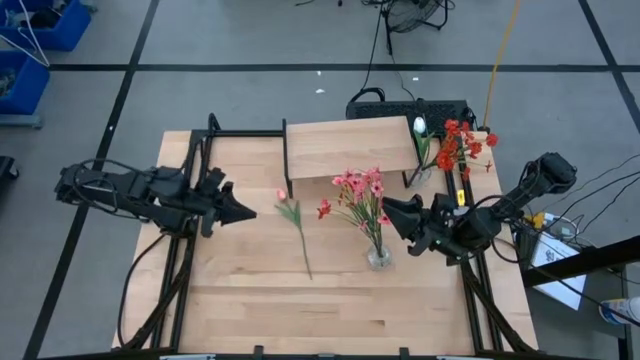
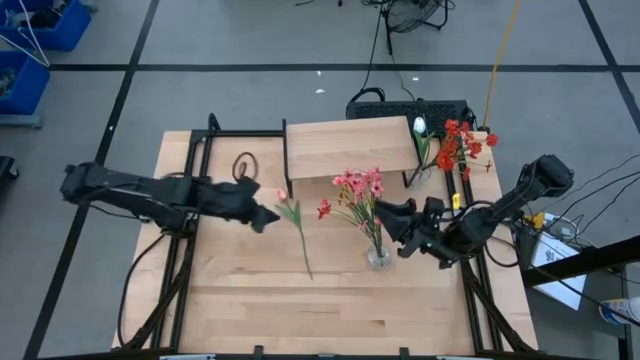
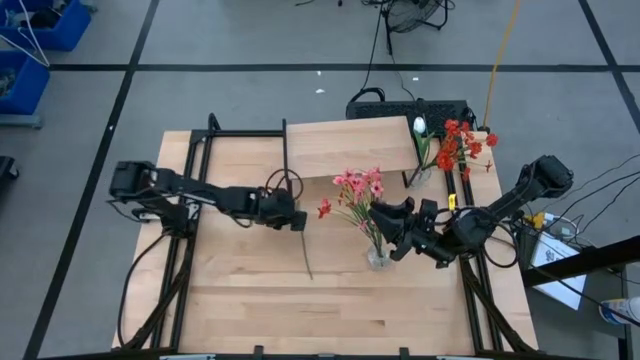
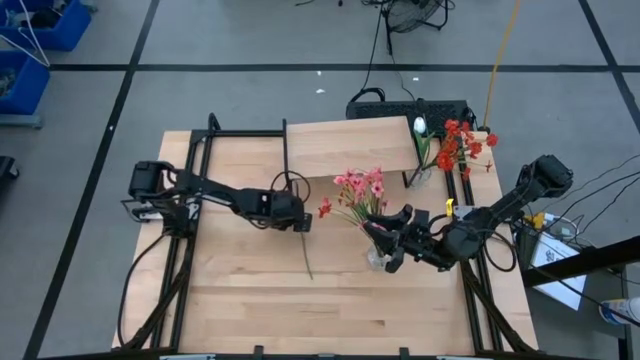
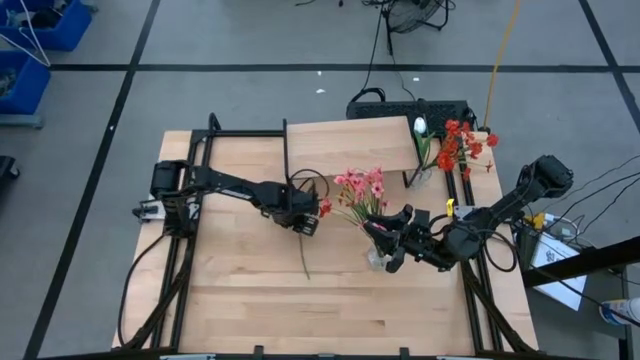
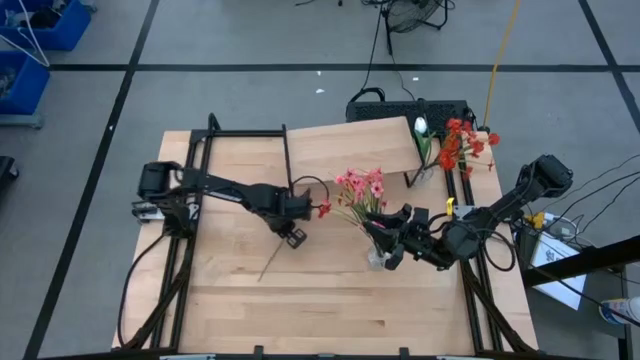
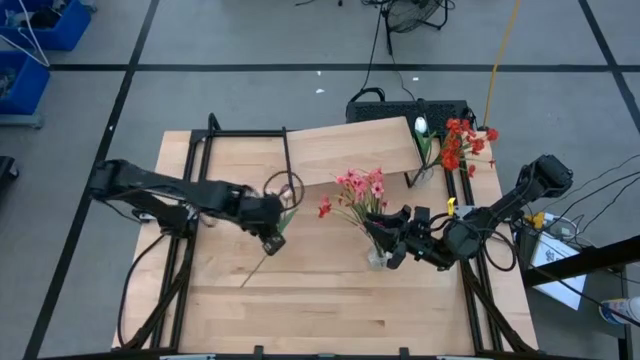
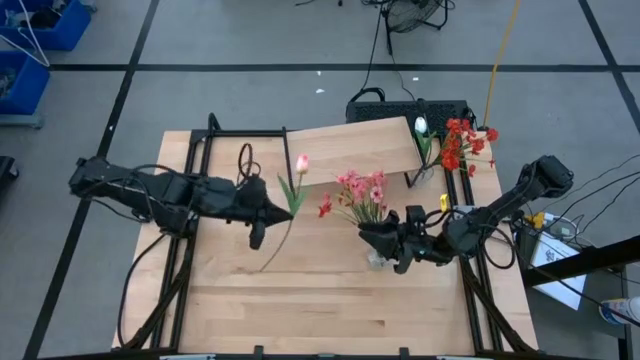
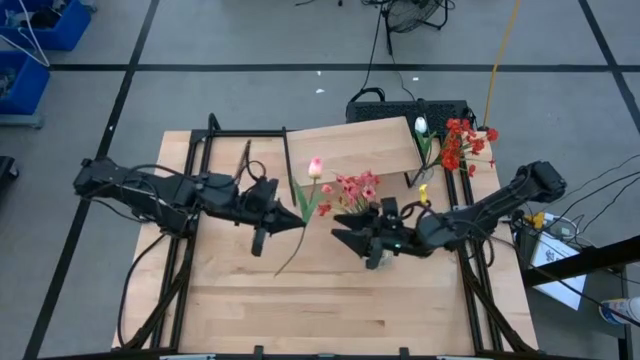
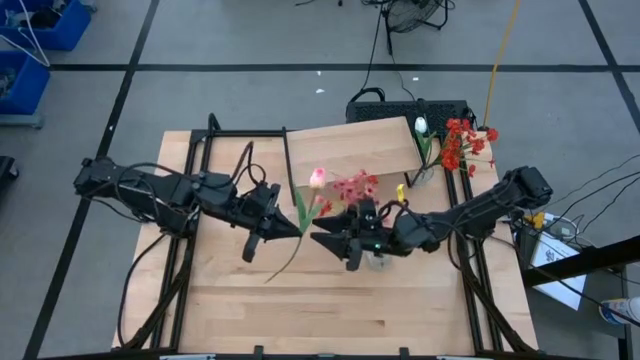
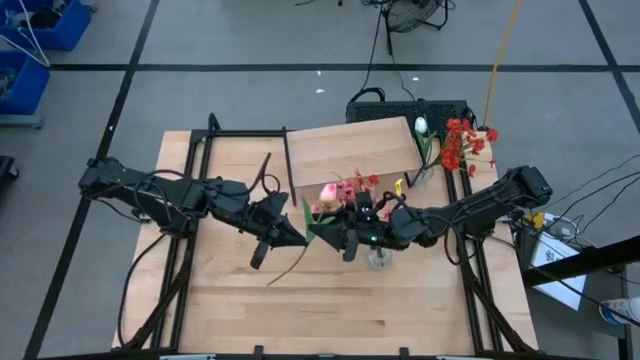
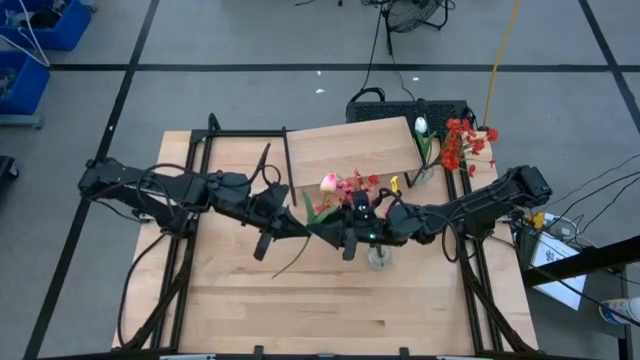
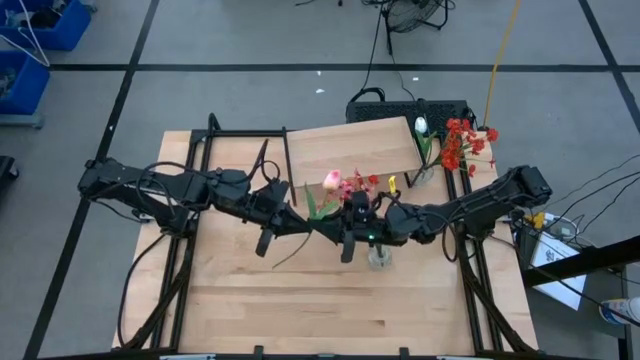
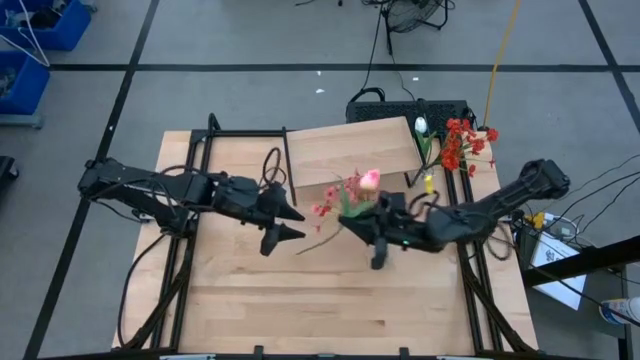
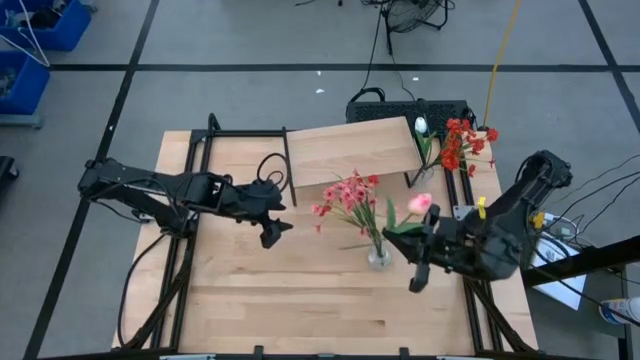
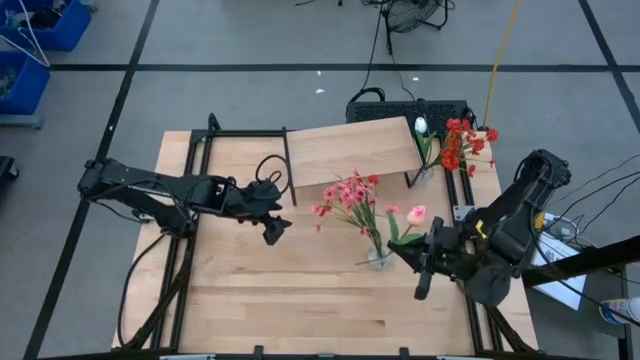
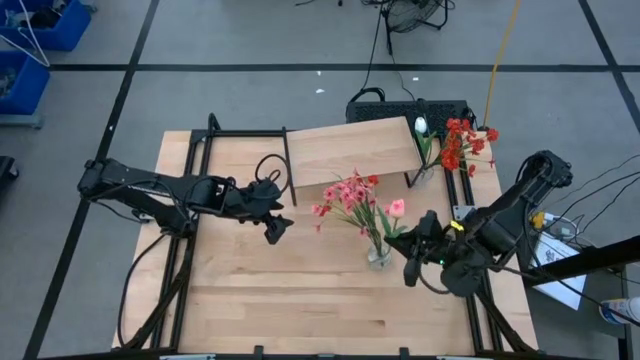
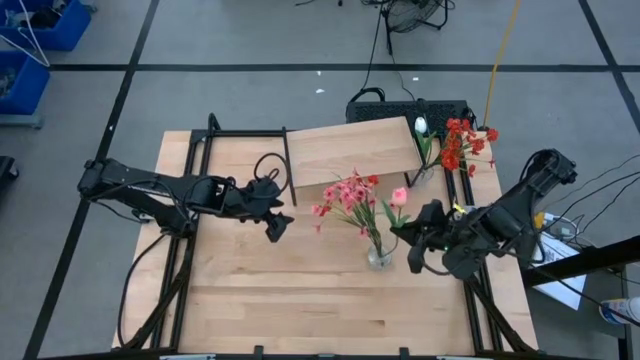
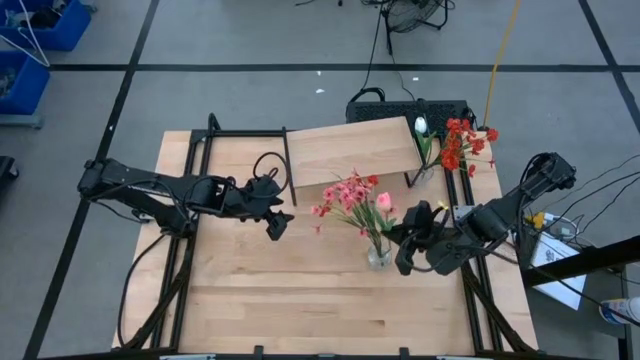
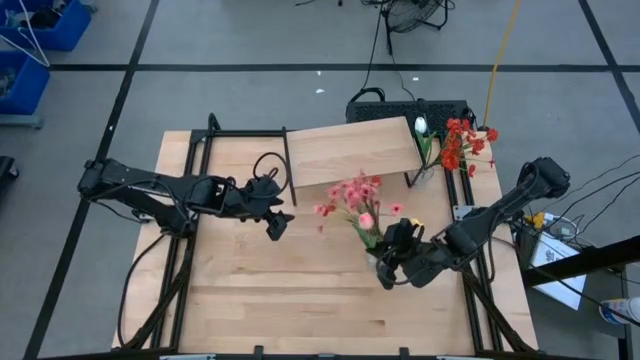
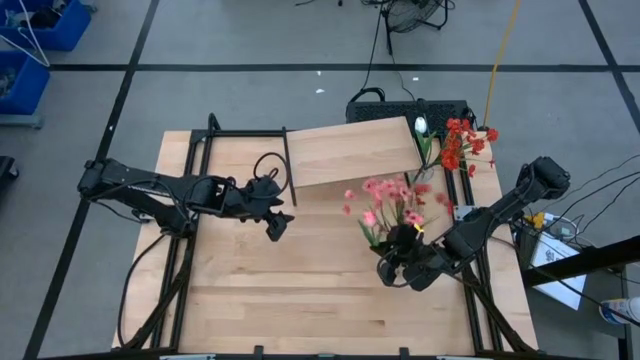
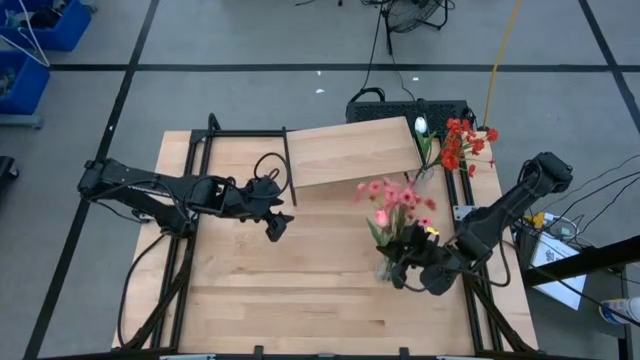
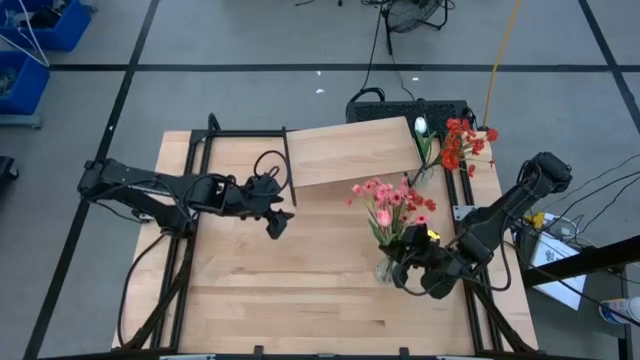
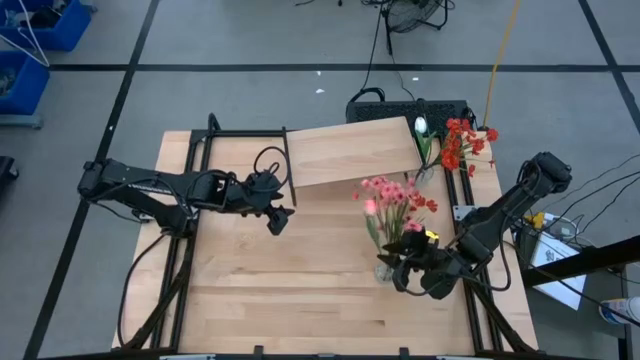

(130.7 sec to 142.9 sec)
Task: Pick and place flowers into a vace then onto a shelf
Put the pink flower into the bottom transparent vase

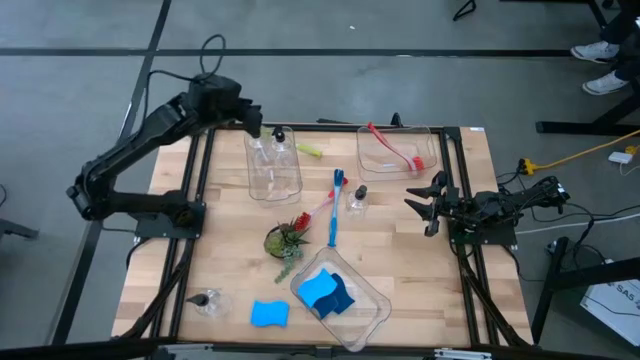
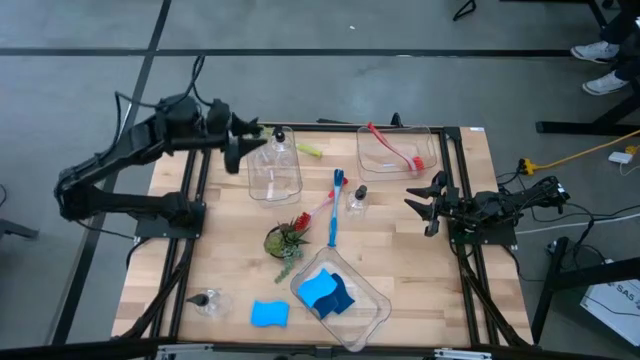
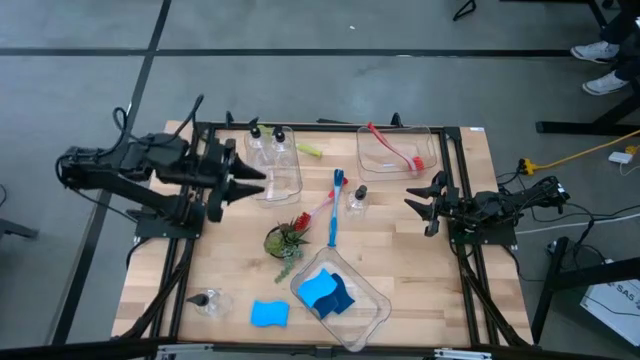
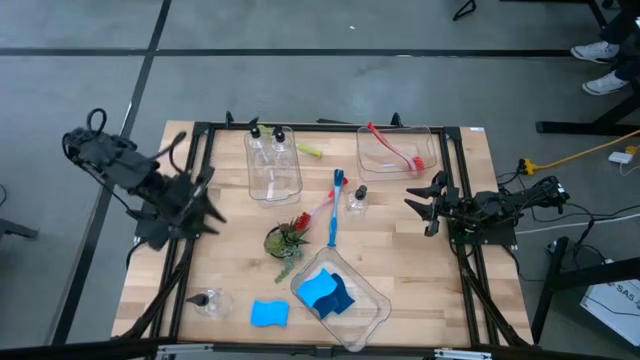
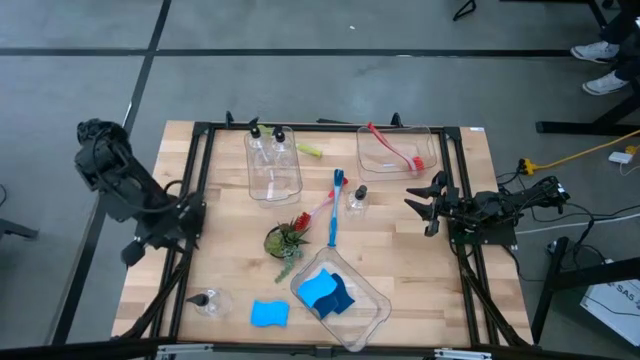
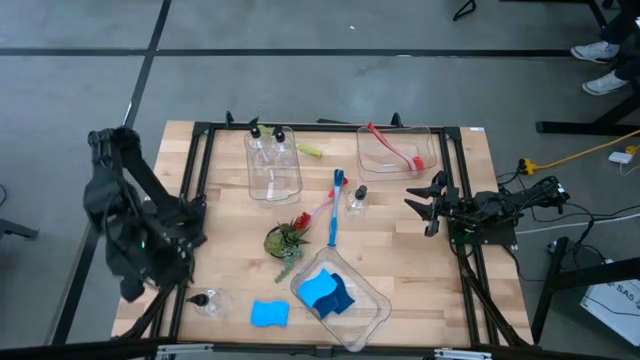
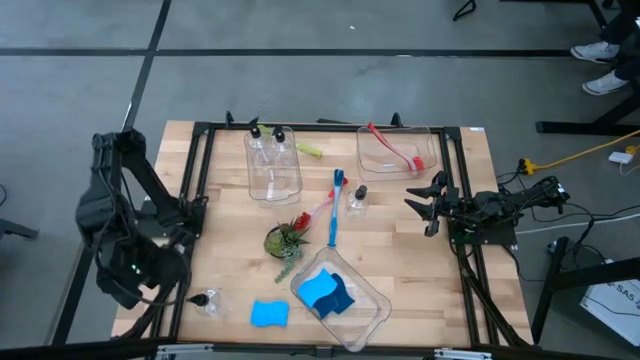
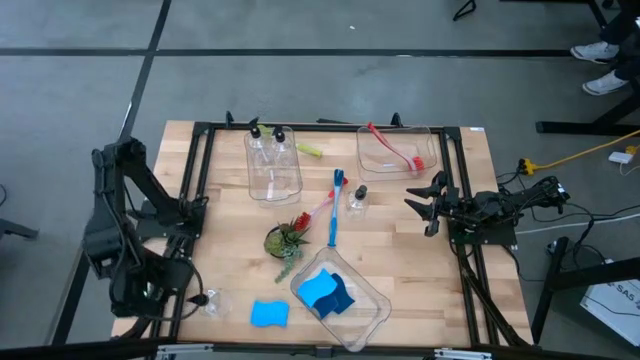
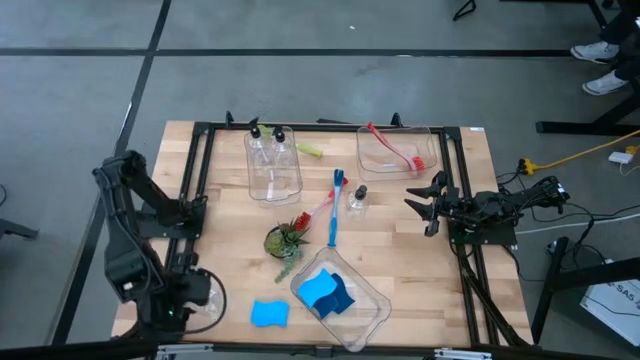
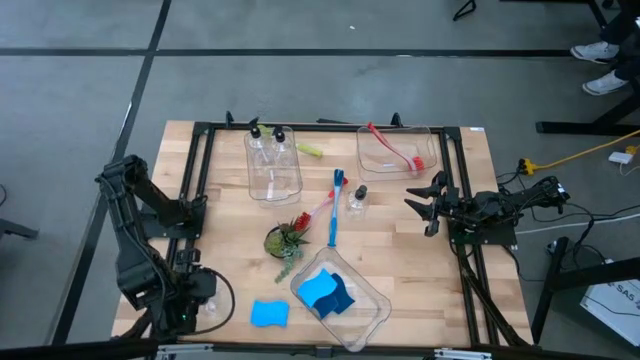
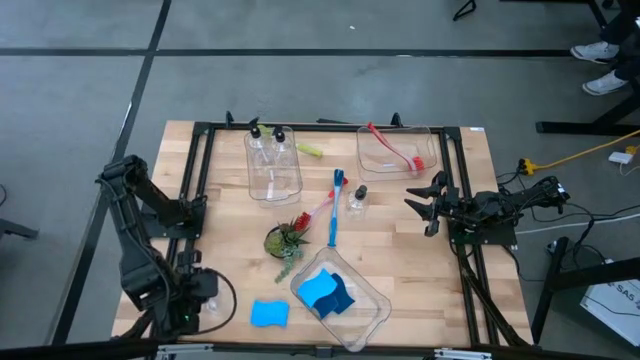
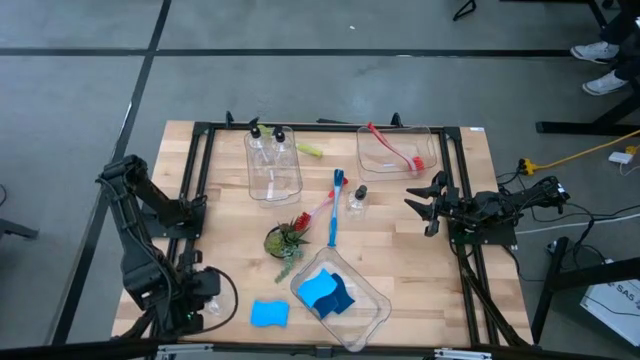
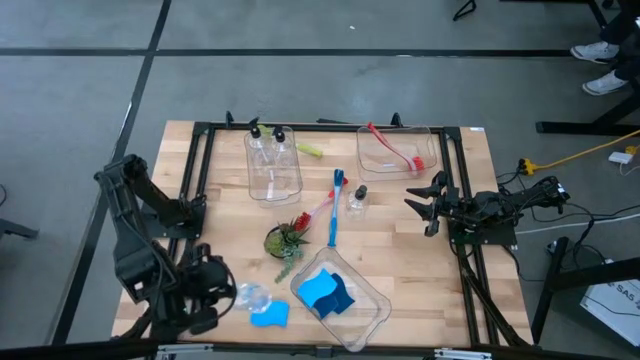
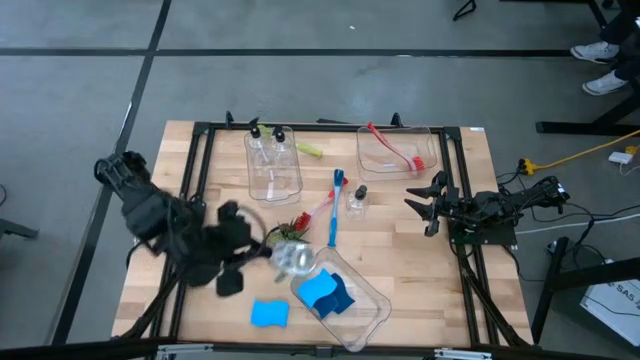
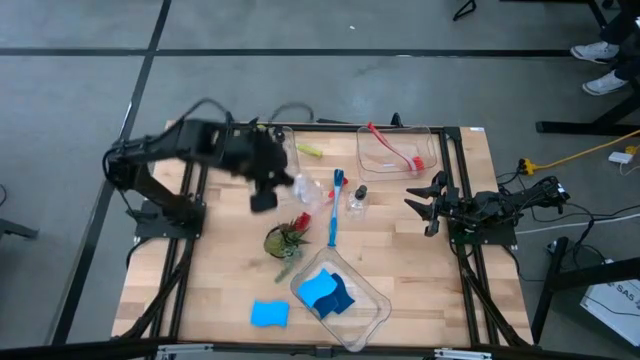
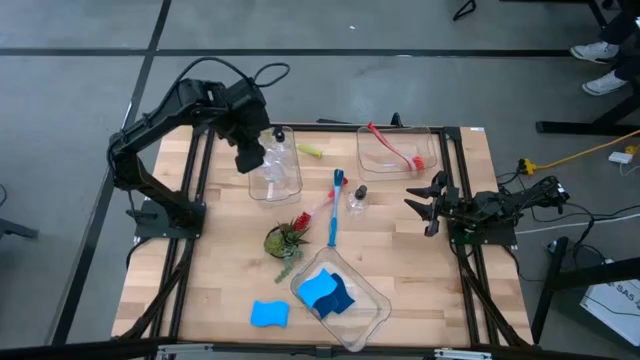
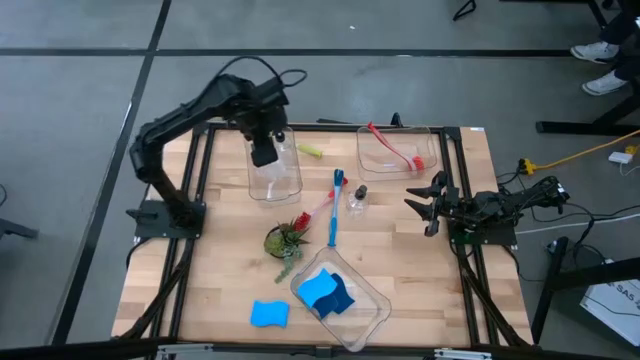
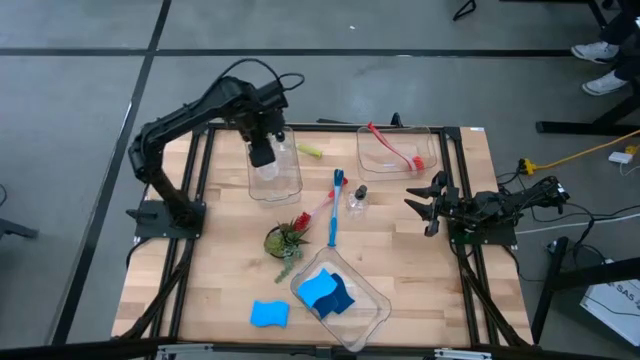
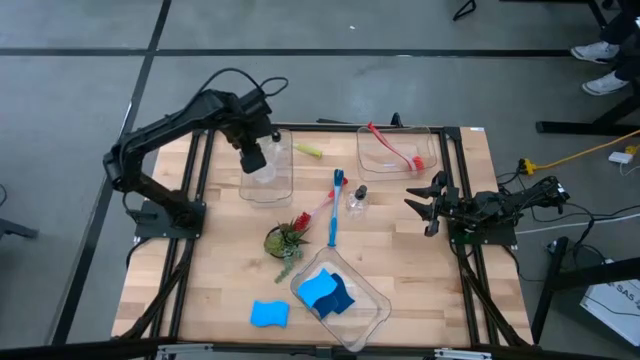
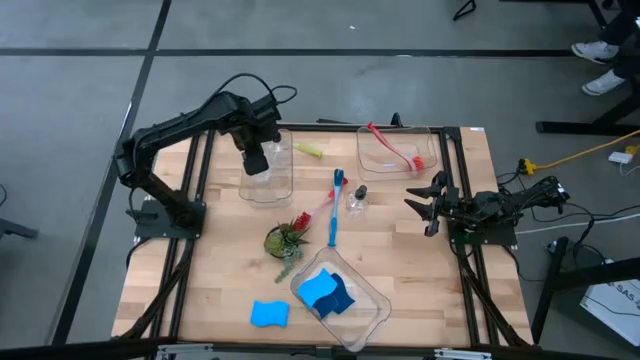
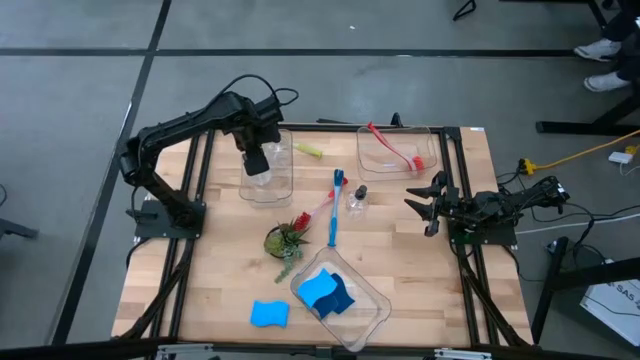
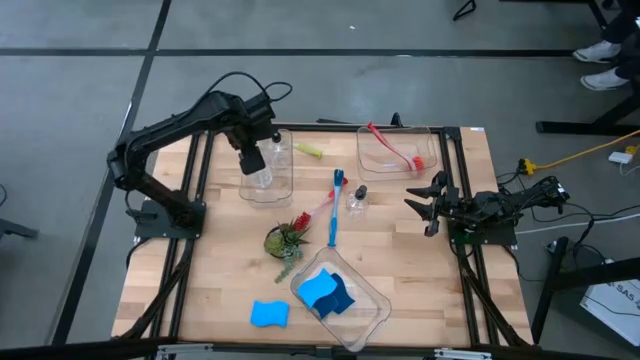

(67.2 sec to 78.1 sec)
Task: Pick & Place Kitchen Sink Supplies
Put the transparent soap dispenser into the top left transparent bin
